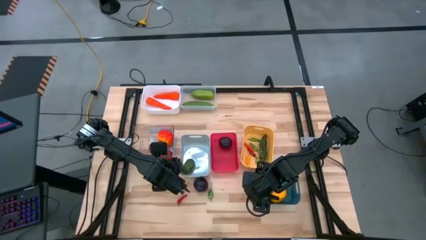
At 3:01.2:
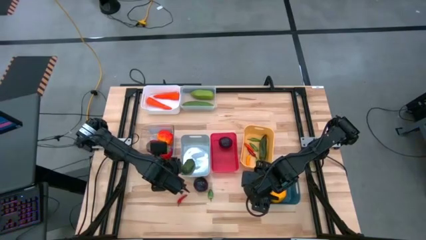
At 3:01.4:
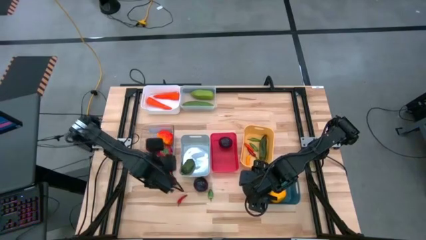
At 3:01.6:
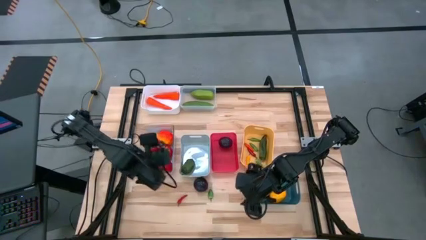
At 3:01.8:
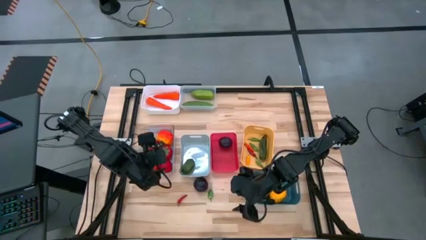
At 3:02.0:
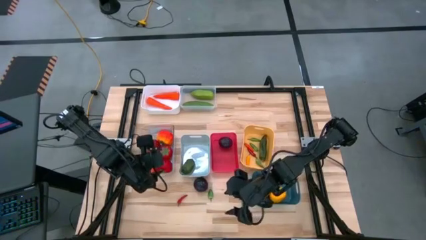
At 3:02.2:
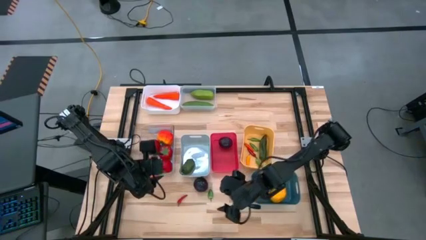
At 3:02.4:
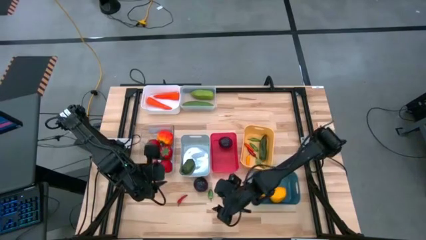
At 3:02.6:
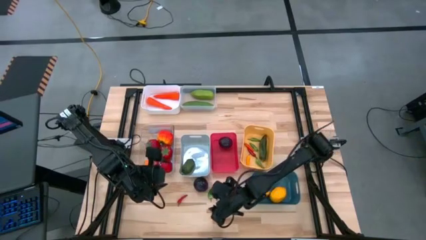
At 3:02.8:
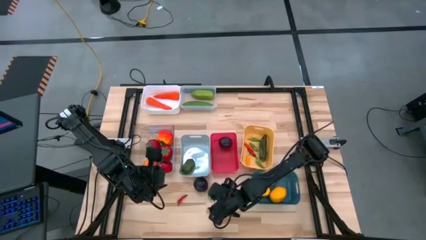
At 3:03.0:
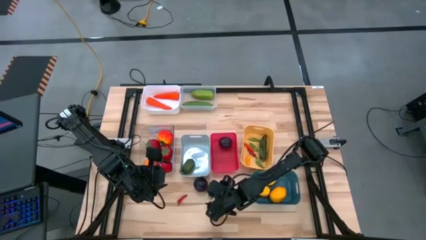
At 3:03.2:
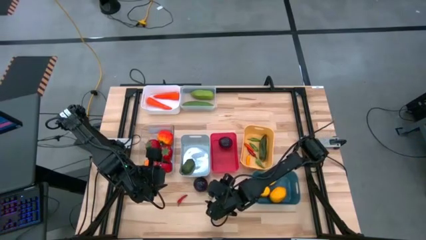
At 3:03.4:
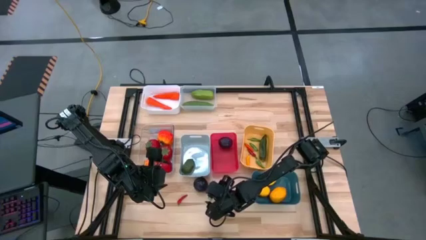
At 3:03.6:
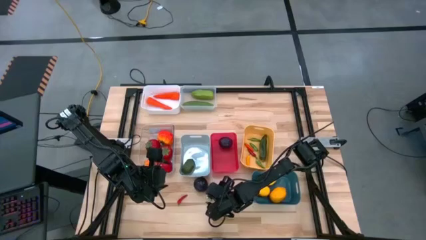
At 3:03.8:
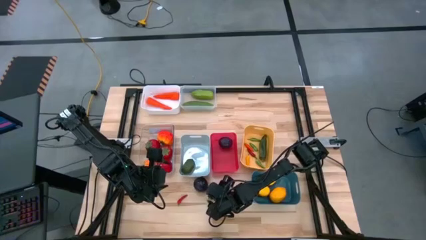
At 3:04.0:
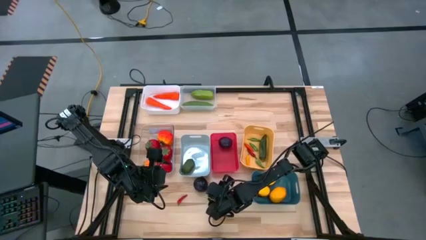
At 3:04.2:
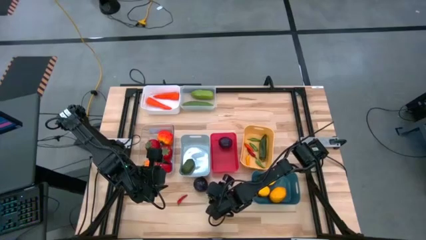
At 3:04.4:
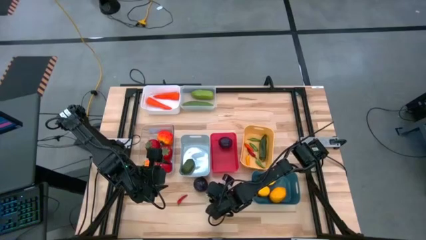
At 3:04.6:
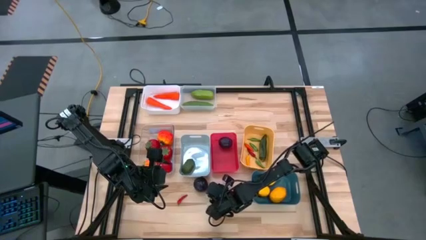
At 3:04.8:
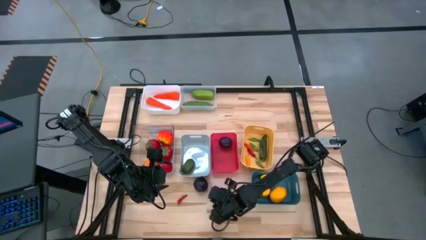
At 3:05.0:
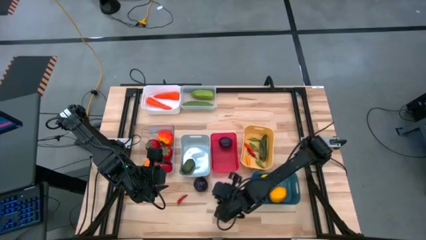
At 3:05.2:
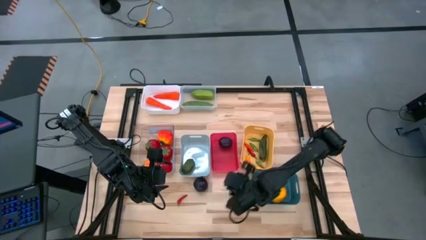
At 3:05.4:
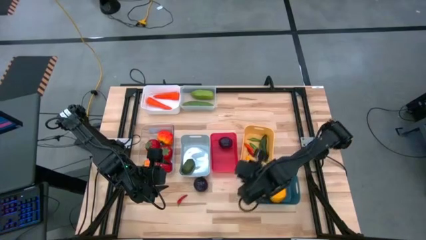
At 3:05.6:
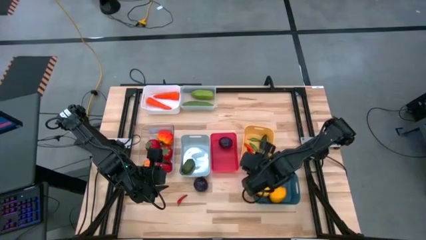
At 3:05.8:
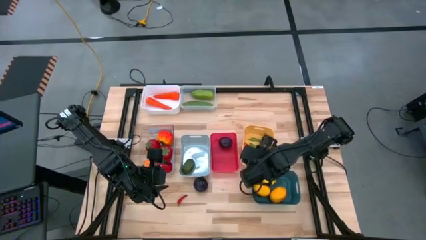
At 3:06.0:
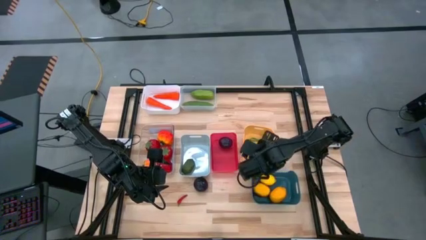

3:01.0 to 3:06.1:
Task: Sort produce into baskets
Put the green chili pepper into the yellow bin

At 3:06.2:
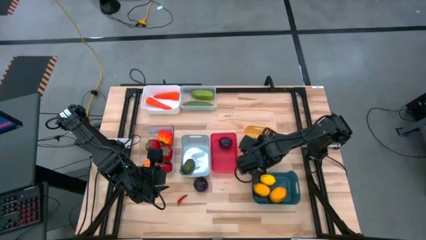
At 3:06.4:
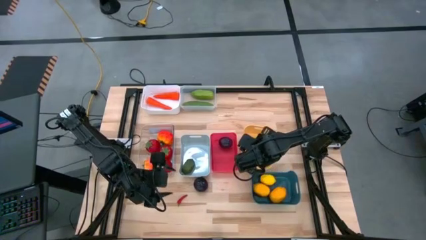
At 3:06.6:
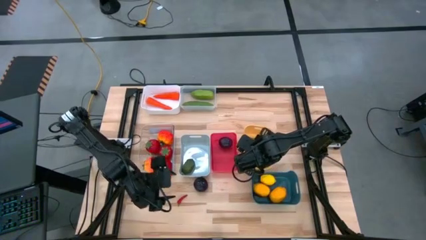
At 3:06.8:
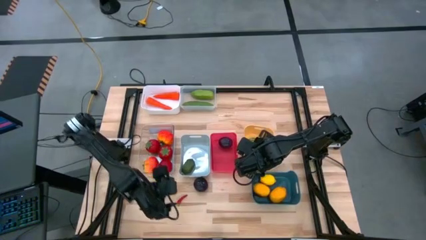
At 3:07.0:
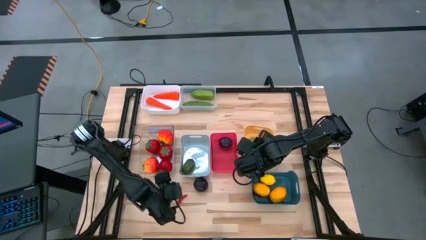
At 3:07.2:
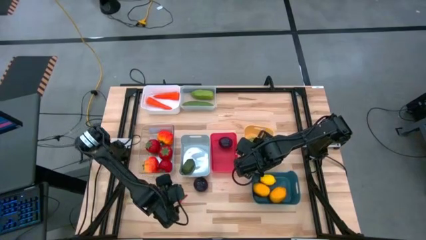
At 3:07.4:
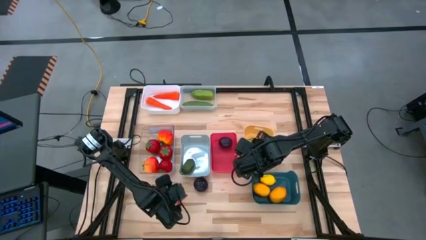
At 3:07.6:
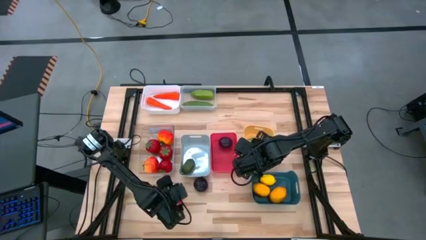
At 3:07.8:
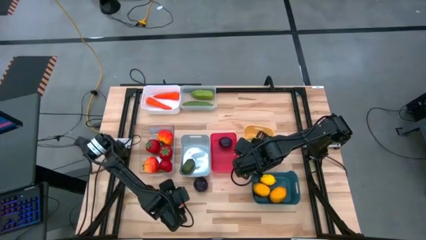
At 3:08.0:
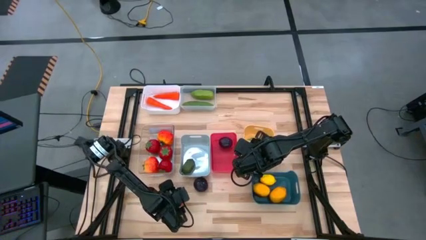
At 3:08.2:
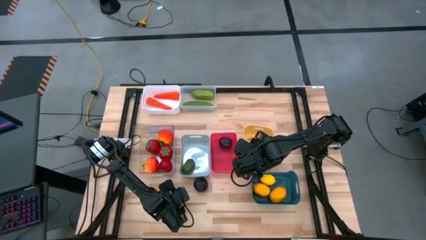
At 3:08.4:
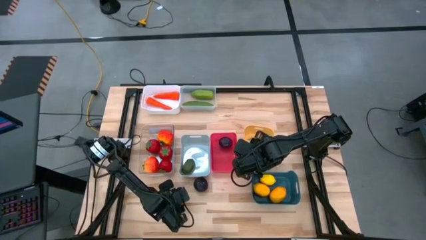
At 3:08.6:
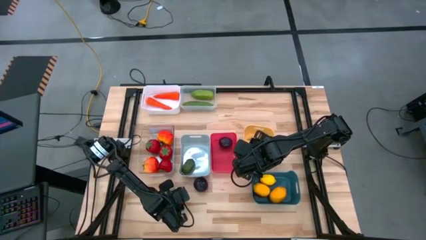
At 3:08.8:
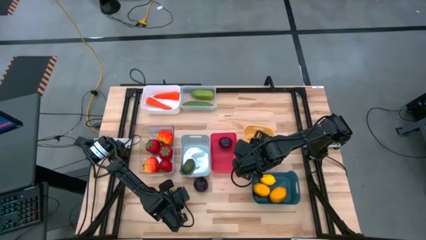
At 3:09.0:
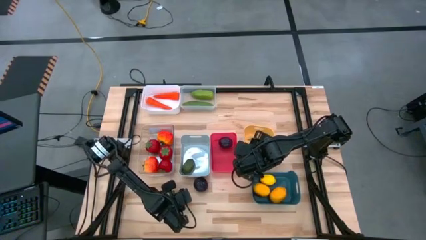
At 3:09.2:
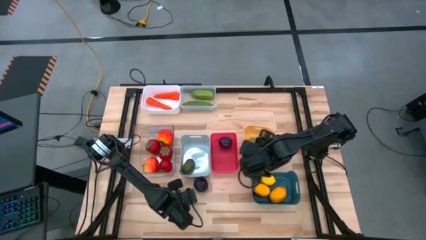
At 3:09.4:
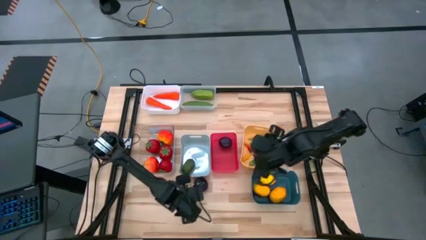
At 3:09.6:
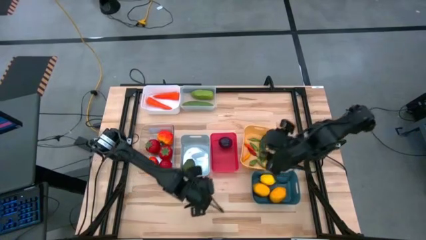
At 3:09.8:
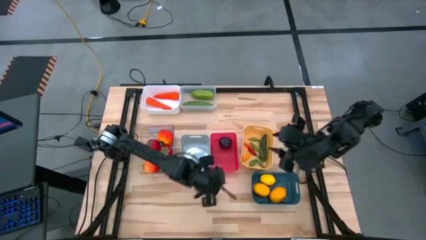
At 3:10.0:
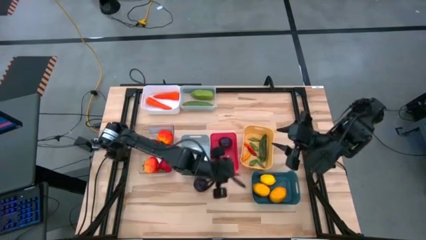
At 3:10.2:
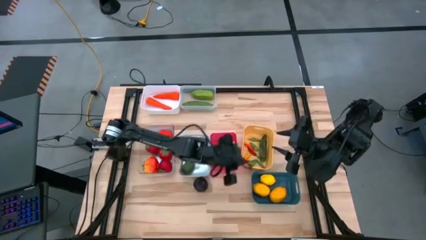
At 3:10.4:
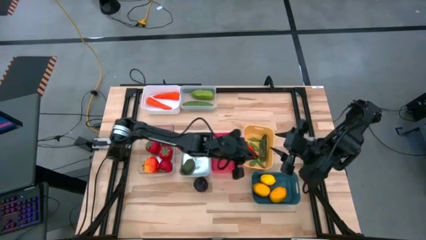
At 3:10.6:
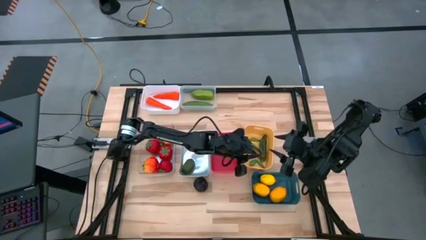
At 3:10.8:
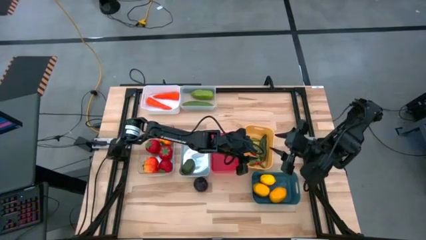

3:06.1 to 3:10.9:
Put the red chili pepper into the yellow bin

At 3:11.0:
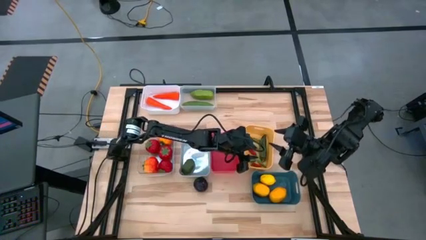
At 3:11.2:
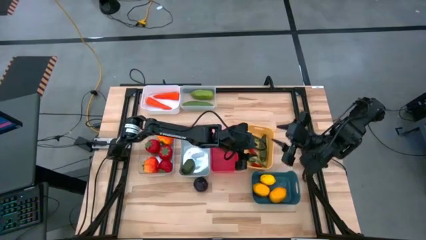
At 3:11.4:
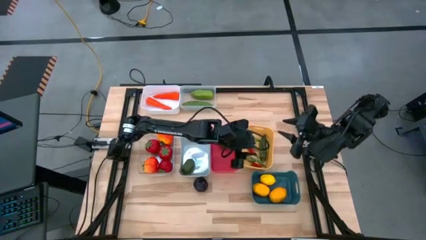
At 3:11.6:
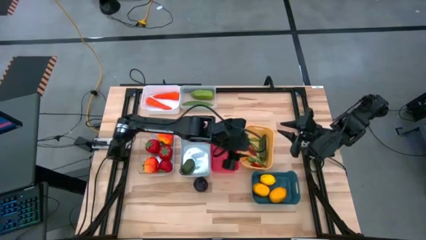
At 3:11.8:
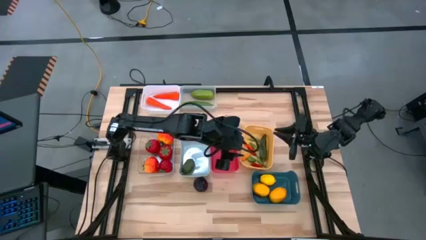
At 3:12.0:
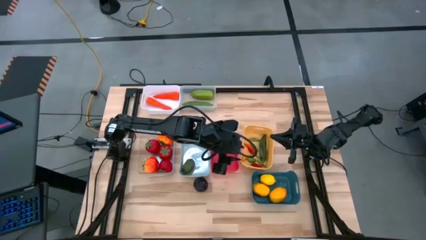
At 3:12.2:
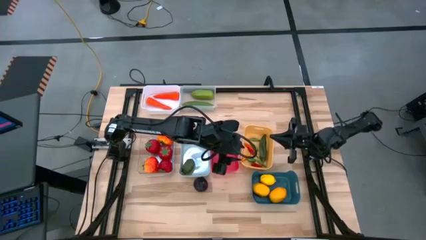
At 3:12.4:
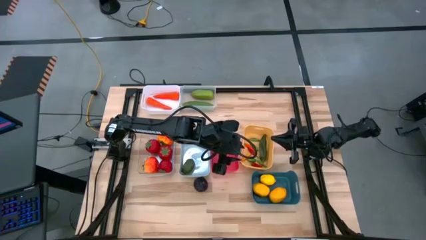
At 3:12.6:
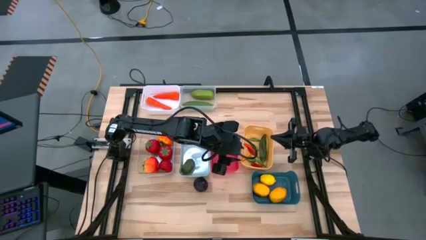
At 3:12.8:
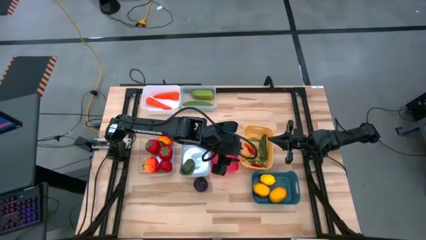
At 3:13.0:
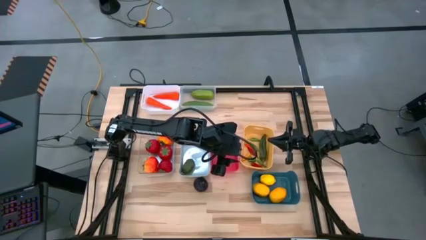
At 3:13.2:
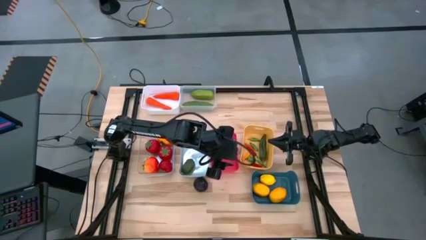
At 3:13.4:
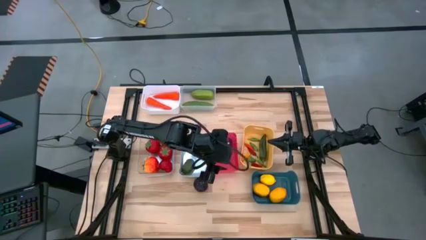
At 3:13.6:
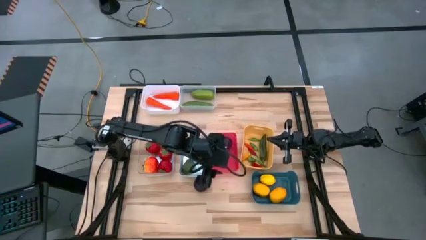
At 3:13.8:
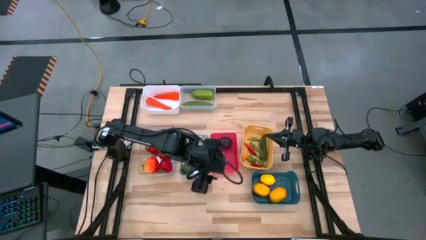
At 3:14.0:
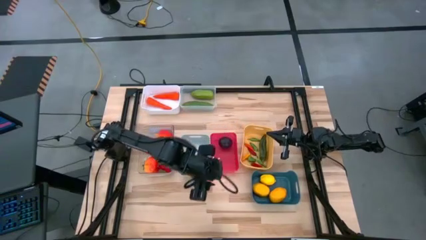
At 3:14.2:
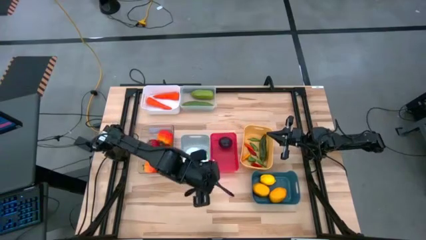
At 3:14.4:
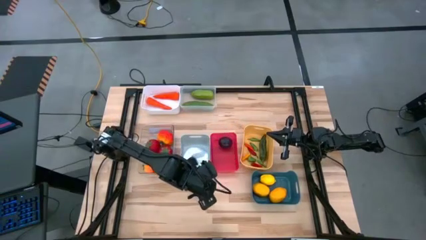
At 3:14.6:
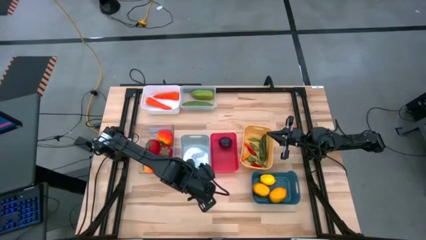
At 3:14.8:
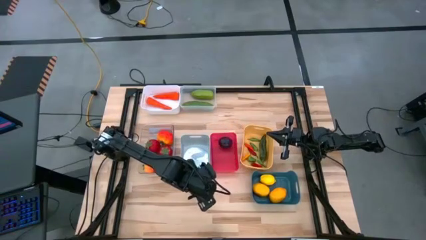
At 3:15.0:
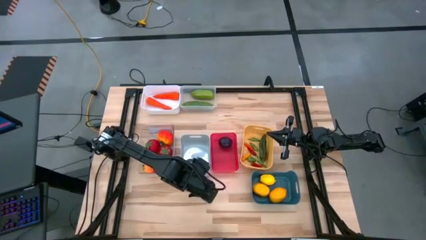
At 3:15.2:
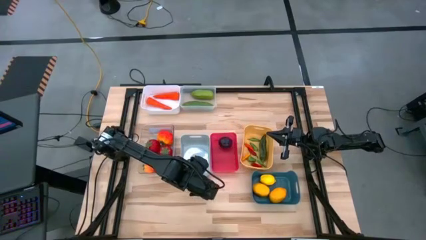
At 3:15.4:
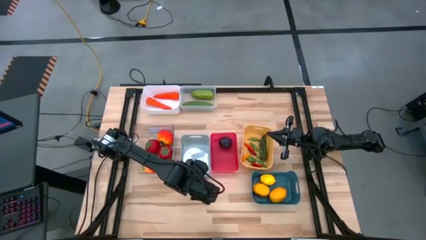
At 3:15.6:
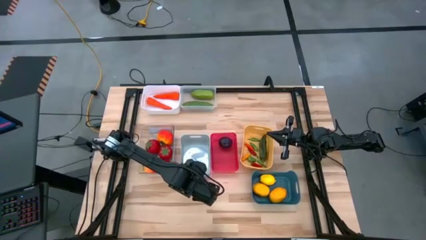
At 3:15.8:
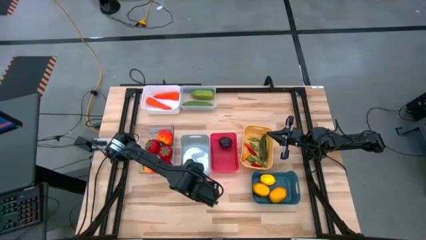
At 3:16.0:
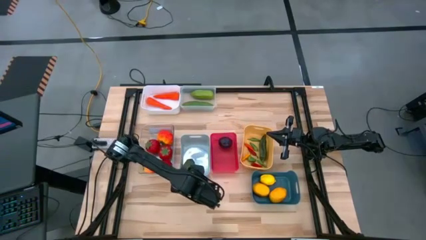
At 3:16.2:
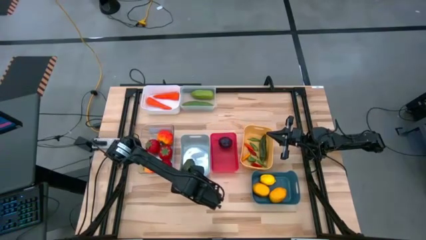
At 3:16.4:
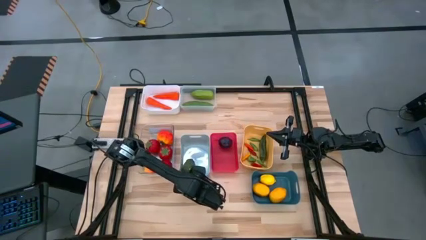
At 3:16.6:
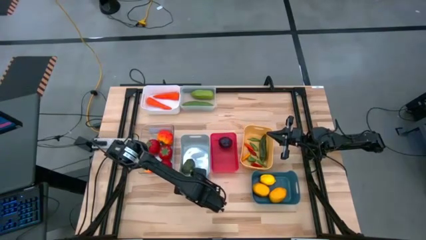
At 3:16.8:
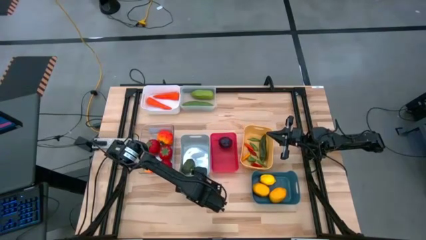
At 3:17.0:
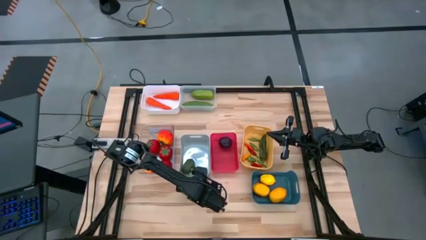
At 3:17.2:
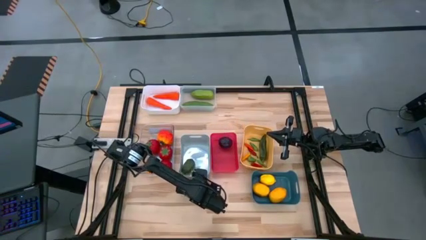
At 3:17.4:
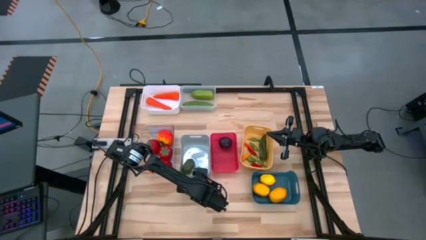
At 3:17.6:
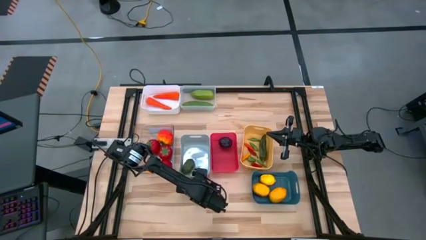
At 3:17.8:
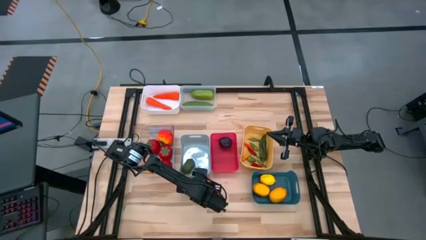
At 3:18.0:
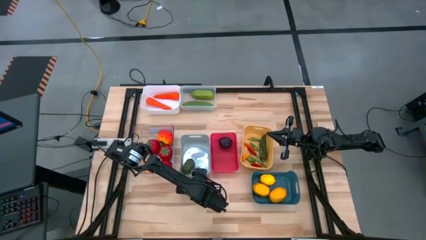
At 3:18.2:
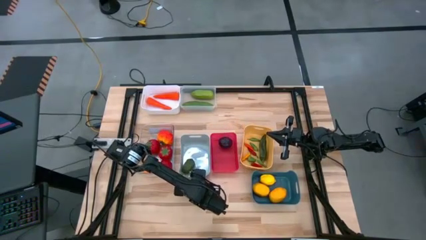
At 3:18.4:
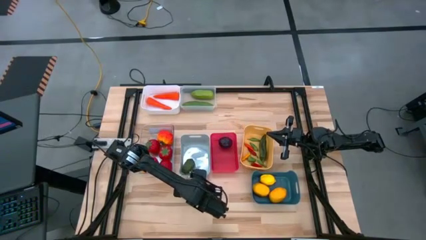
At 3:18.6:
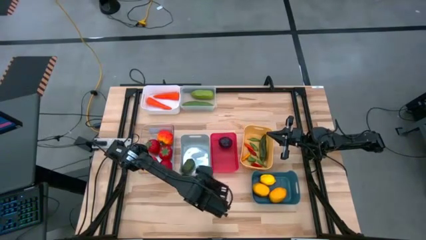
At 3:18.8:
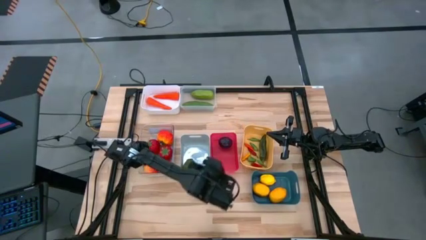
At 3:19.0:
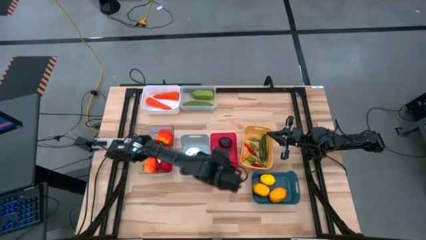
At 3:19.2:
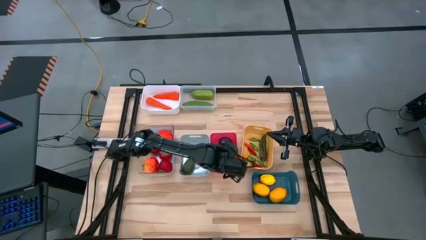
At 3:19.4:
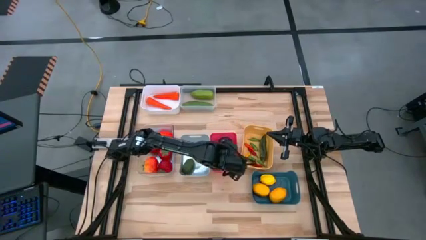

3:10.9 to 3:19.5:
Put the plum into the red bin
